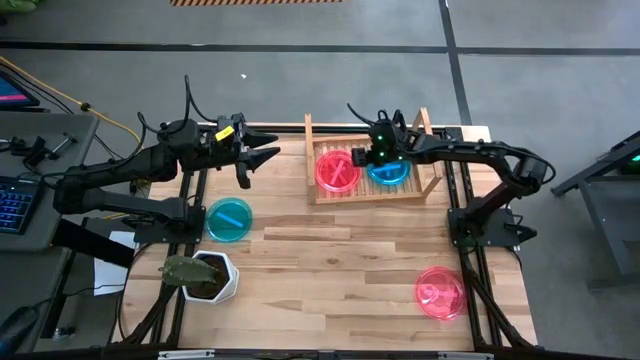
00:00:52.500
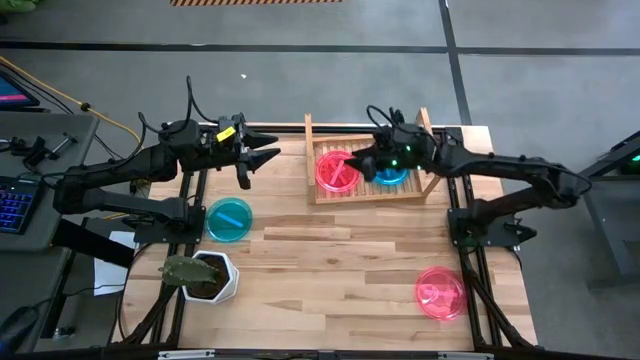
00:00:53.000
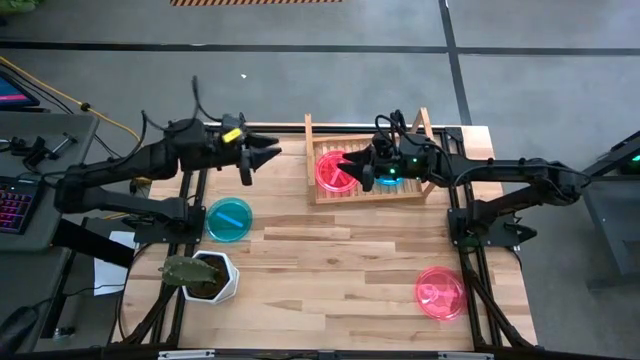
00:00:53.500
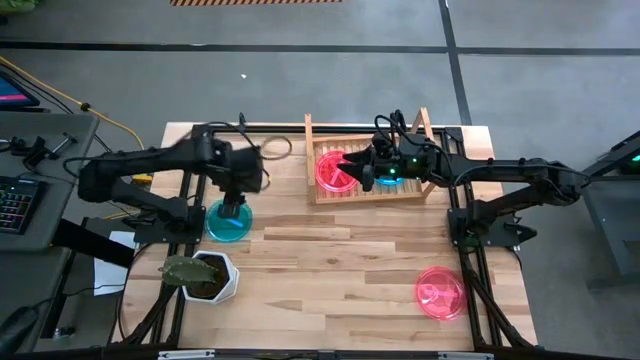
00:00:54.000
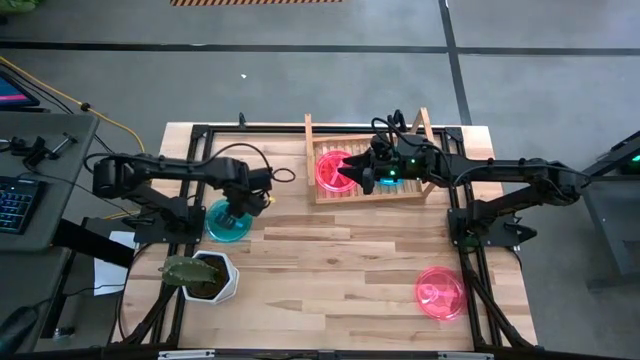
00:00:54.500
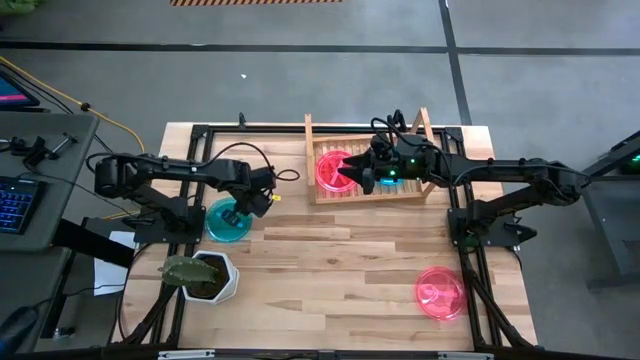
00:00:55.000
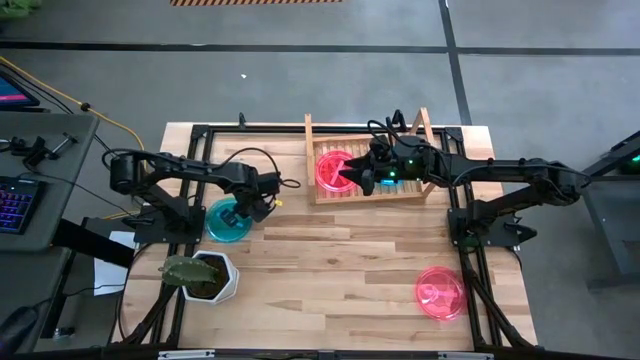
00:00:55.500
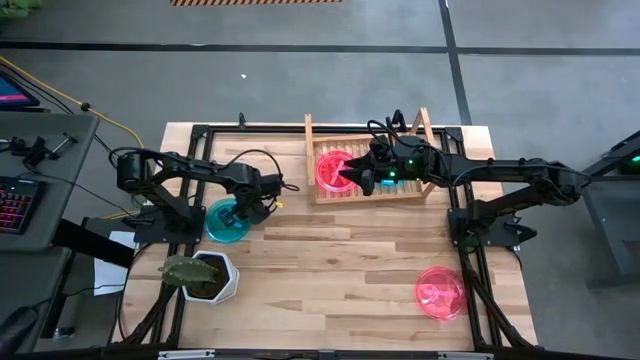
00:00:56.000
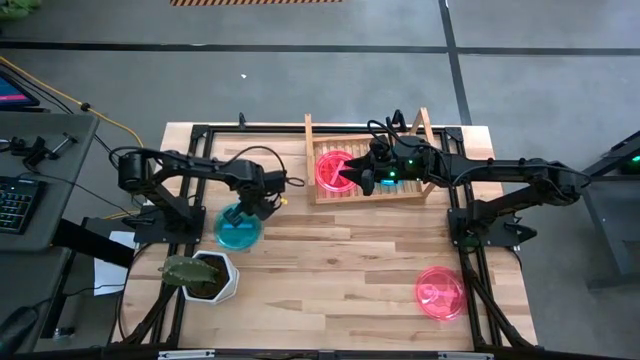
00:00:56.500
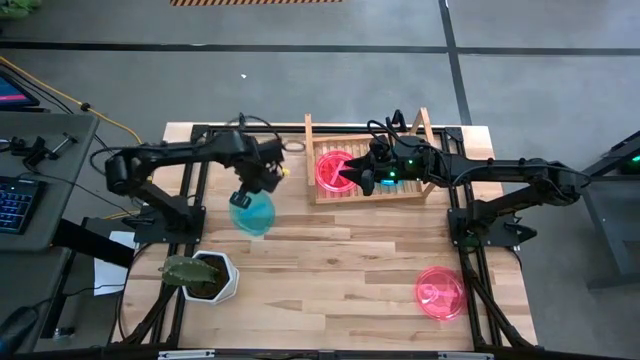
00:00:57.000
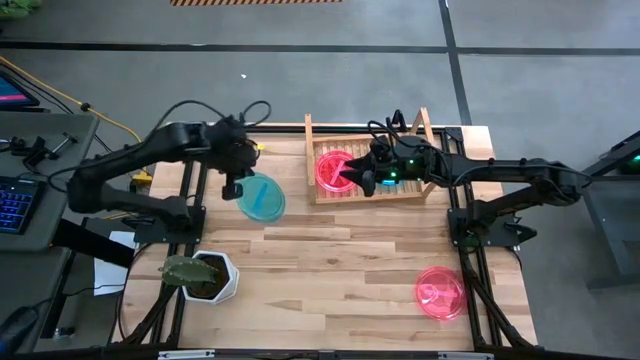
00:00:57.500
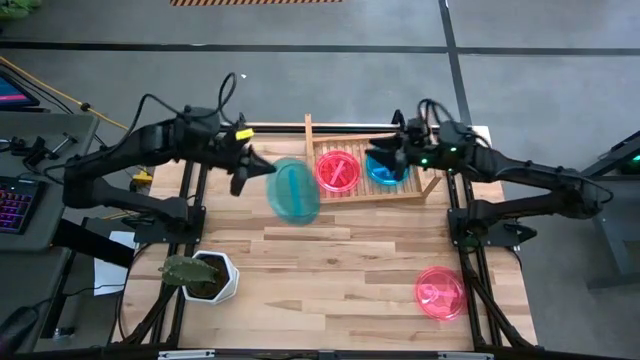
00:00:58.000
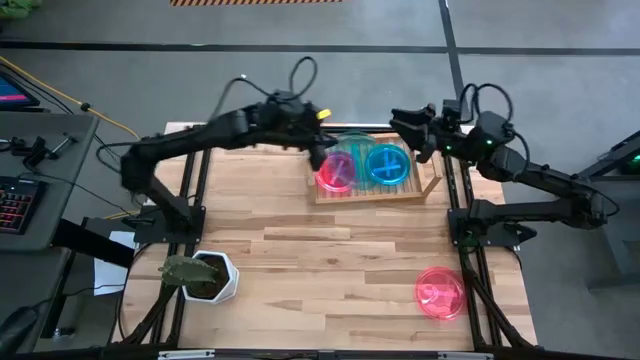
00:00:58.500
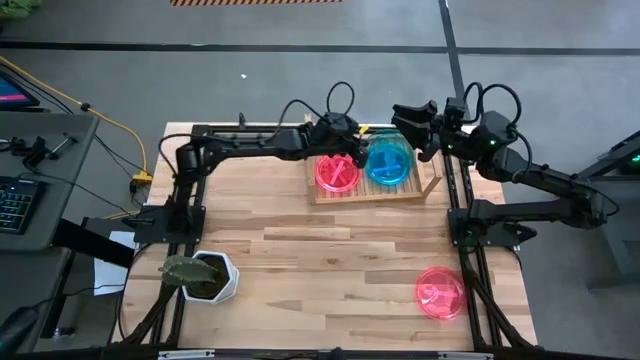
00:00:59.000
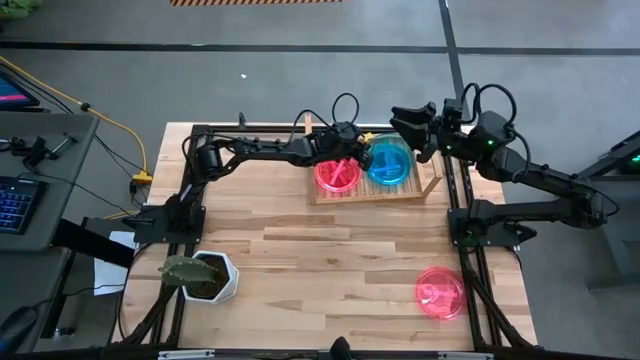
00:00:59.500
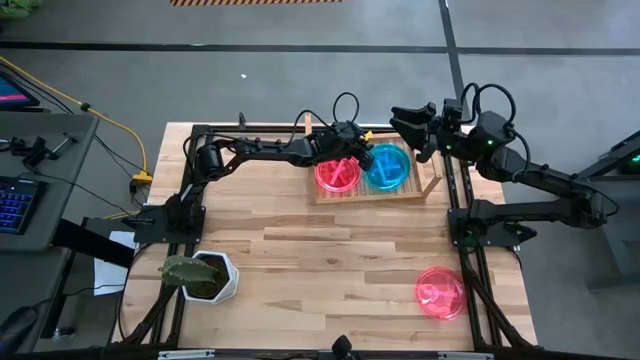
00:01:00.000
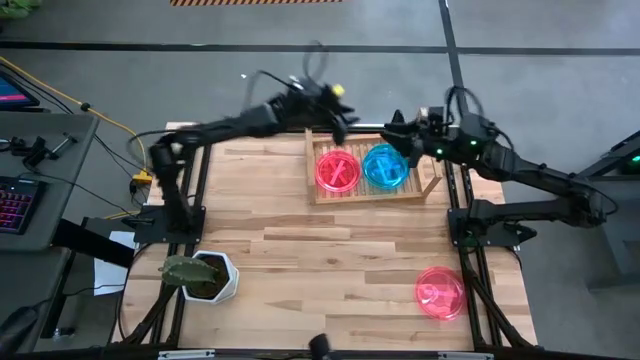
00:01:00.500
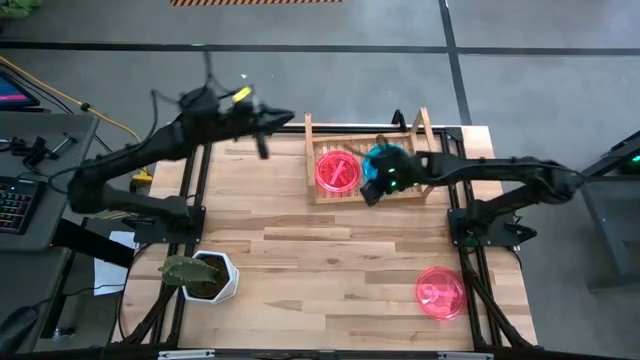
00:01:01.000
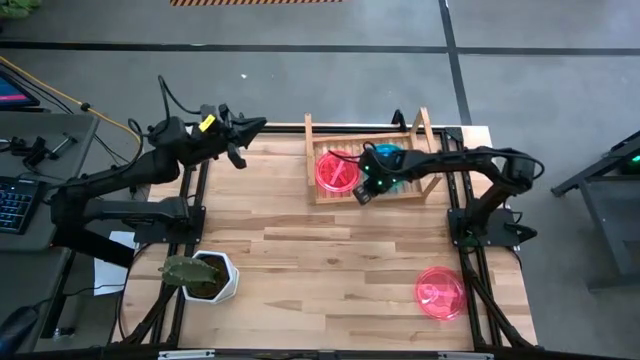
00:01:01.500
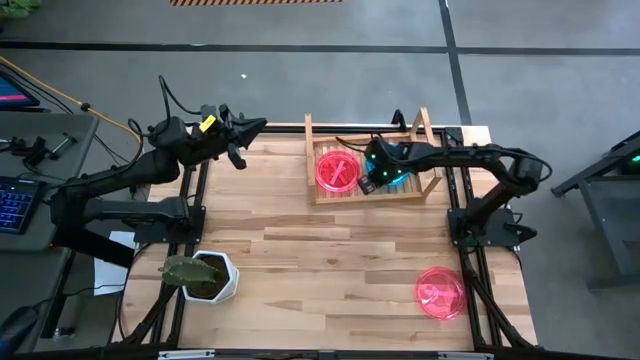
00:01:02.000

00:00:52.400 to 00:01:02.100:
Task: Place and stack plates onto a shelf
Stack the blue plate on top of the other blue plates on the shelf

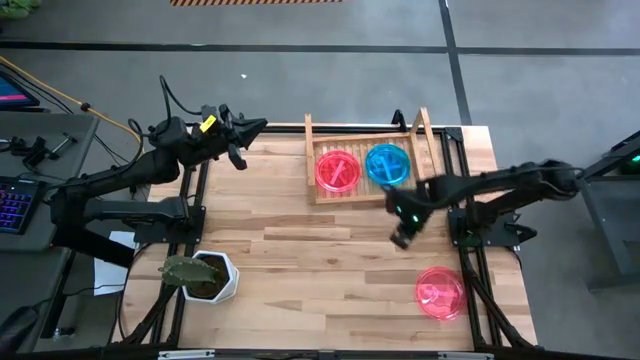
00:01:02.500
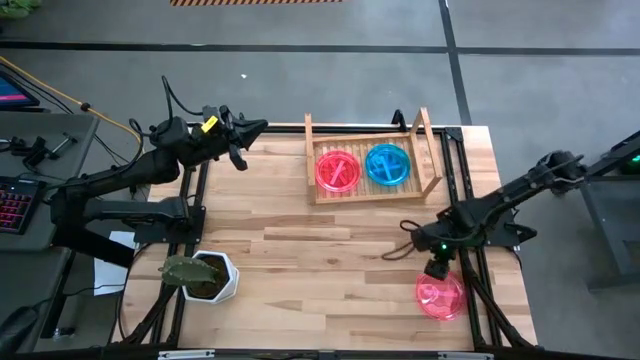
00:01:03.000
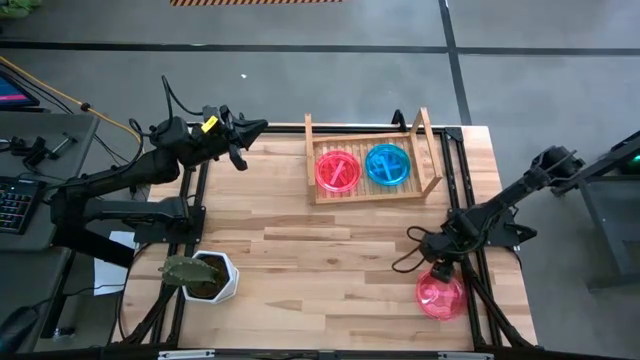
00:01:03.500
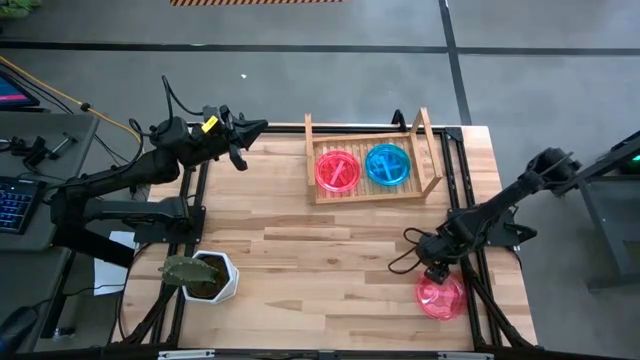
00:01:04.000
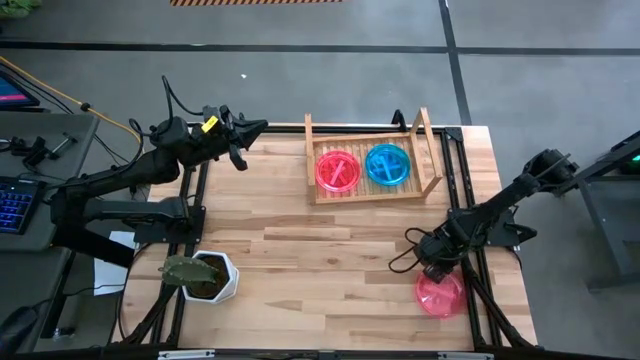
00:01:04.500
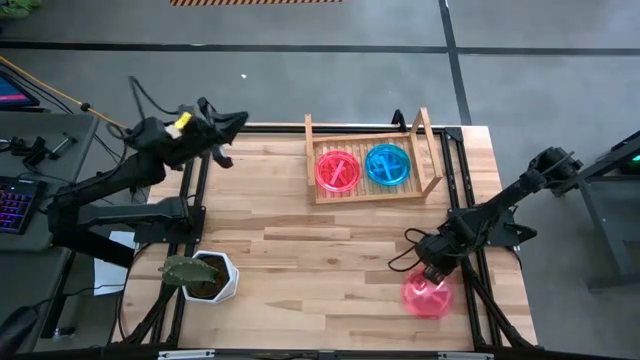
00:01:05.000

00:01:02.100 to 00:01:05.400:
Stack the pink plate on top of the other pink plates on the shelf

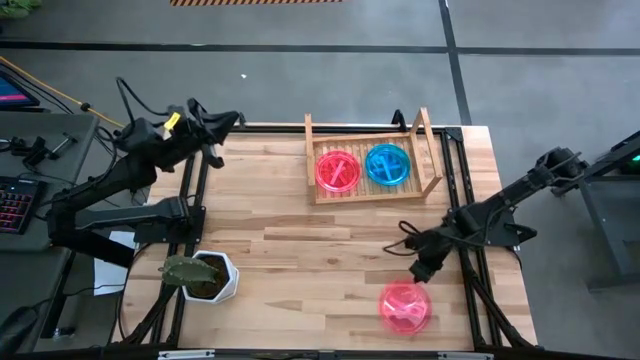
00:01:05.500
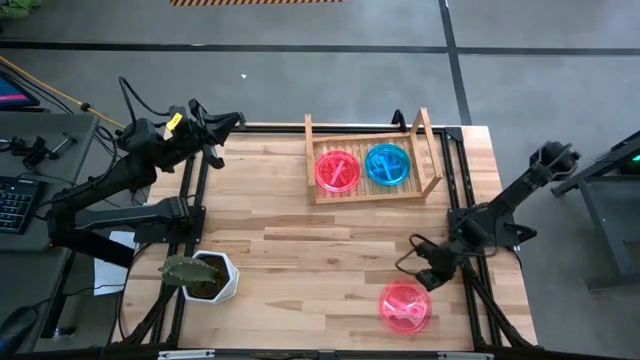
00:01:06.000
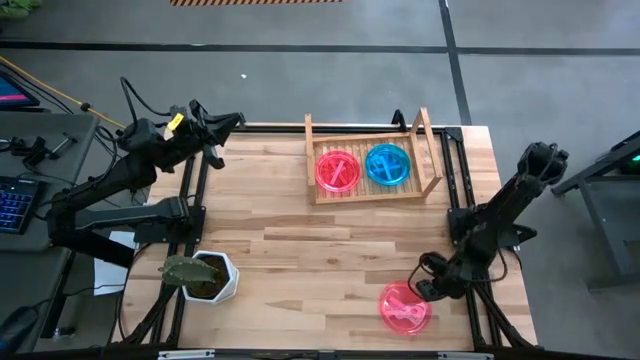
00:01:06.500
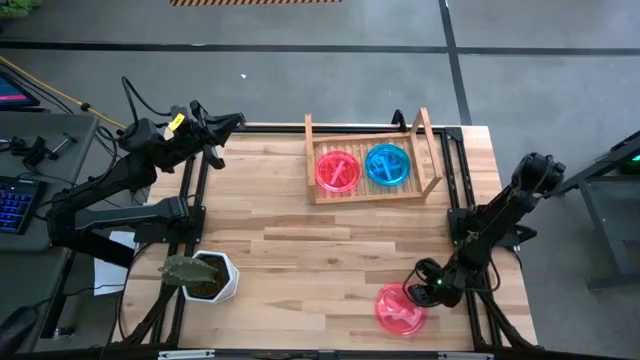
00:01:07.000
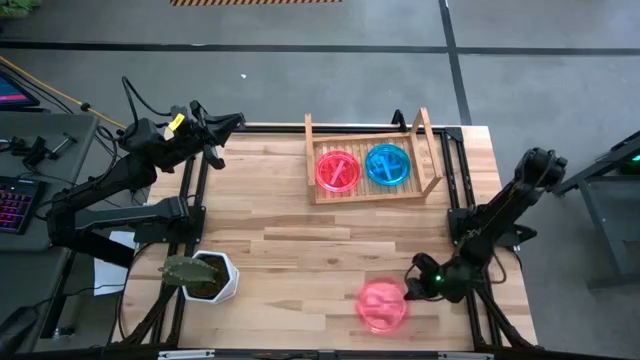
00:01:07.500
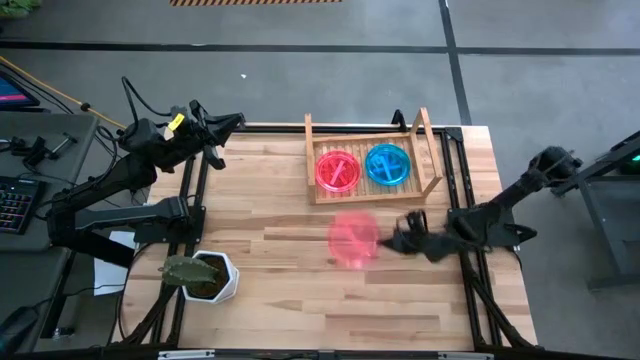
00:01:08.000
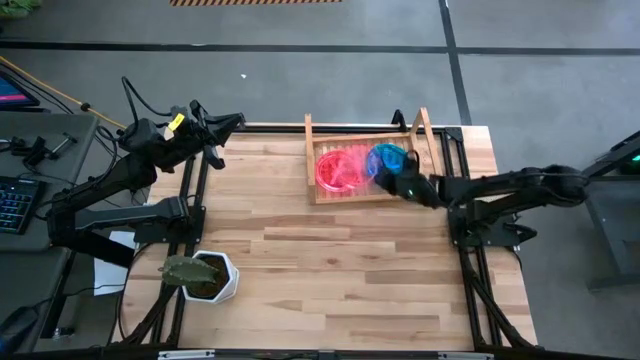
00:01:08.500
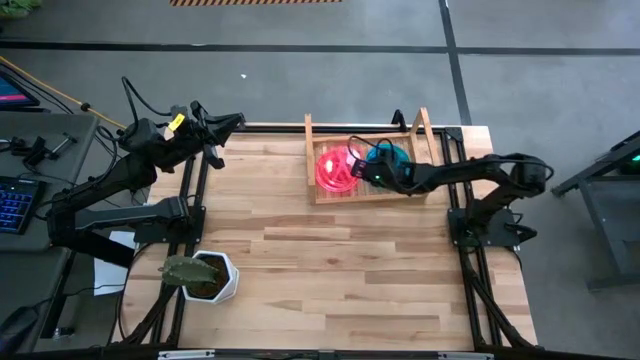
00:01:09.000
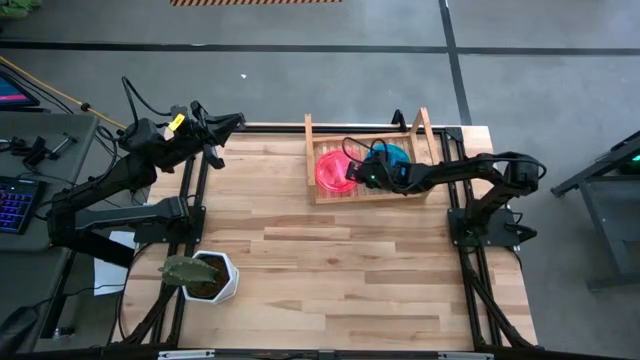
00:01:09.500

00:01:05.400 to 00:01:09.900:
Stack the pink plate on top of the other pink plates on the shelf

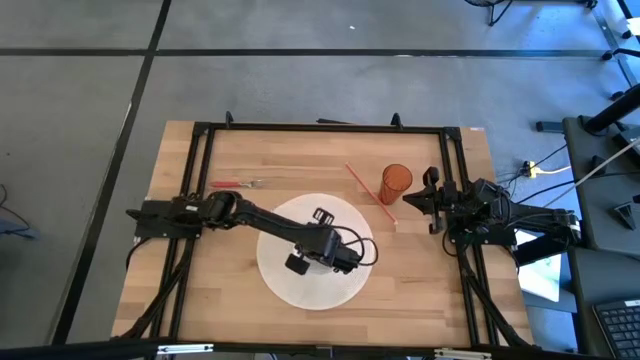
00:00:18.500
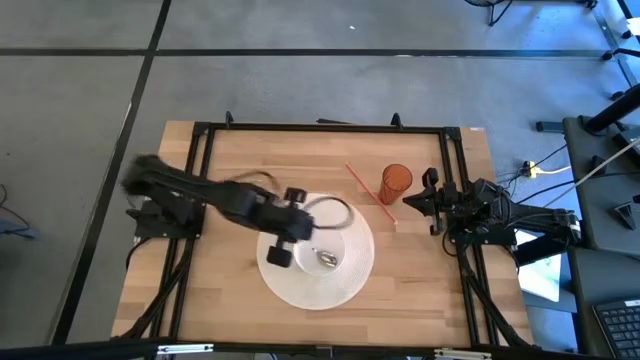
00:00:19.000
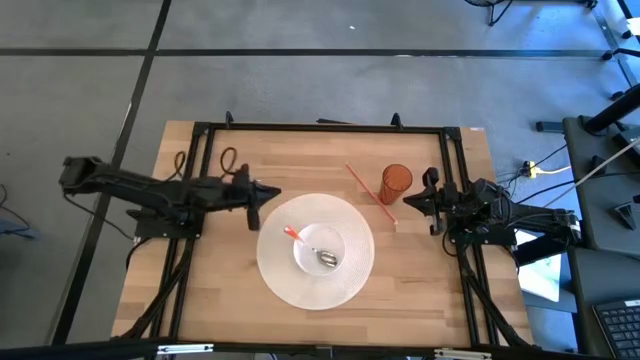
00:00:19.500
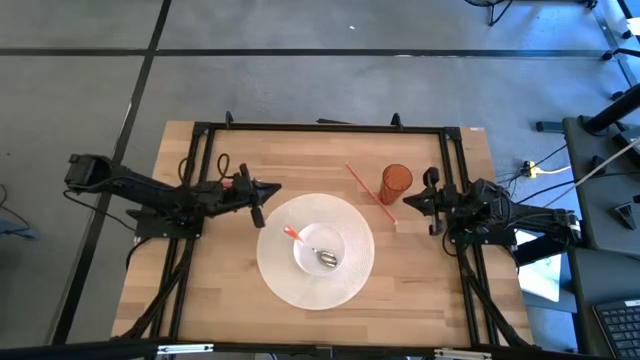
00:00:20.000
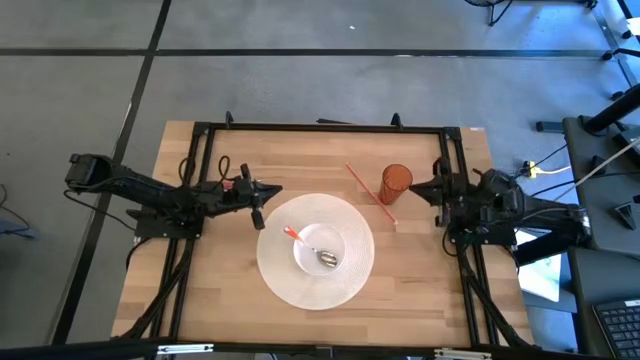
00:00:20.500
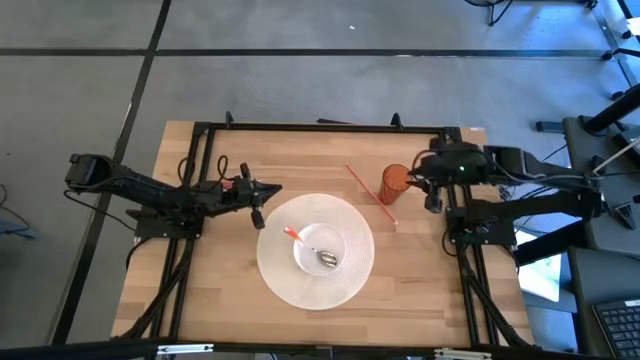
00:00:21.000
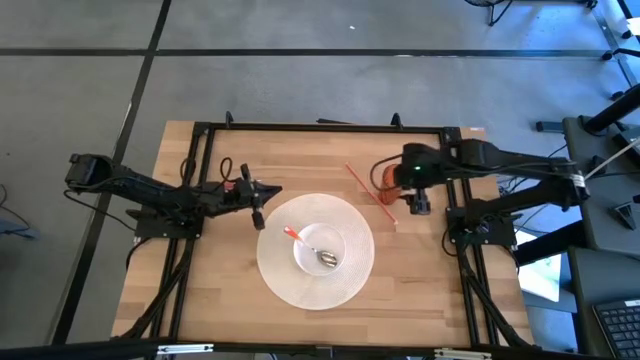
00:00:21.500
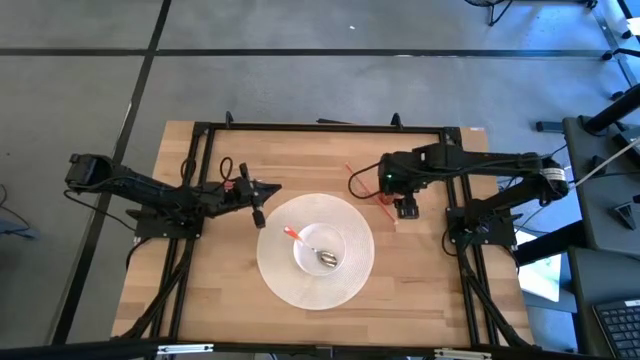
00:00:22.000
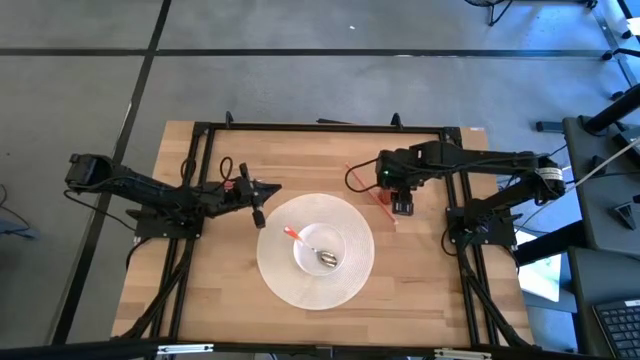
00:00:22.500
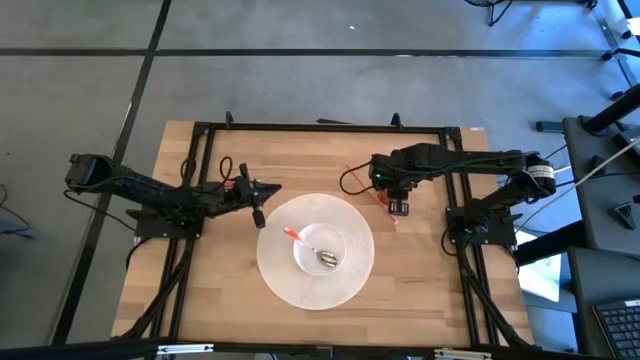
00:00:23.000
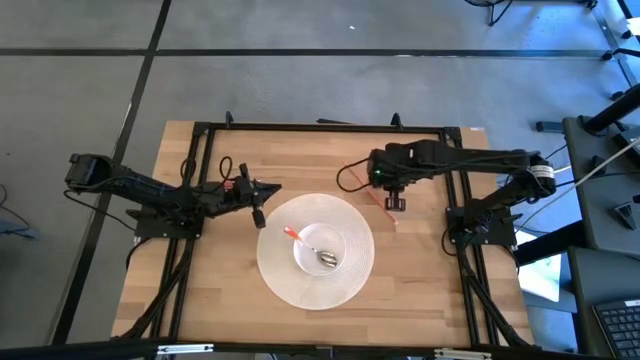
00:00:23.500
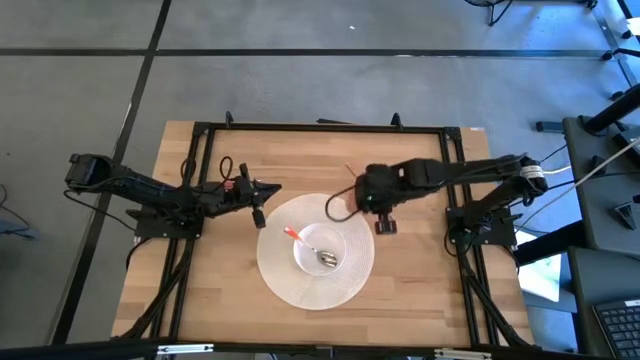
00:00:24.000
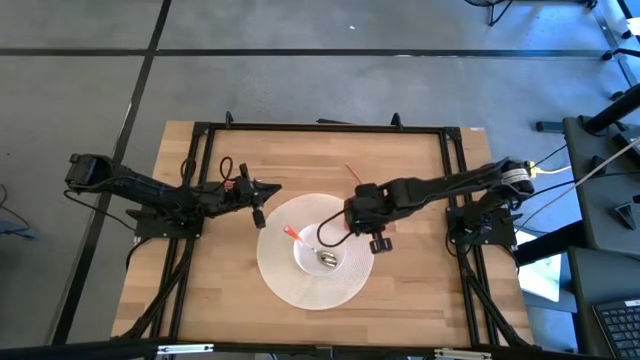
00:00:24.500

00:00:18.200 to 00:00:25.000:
Task: Pick & Place Utensil
Put the red cup on the top right of the white mat
